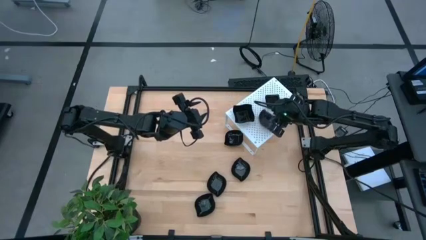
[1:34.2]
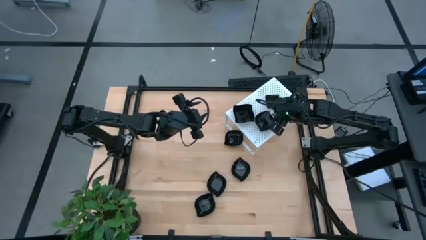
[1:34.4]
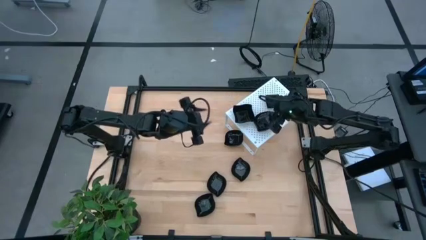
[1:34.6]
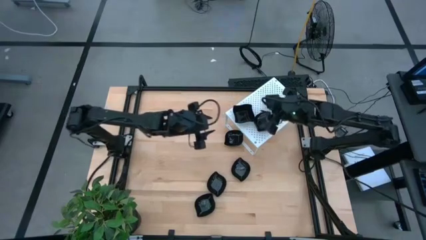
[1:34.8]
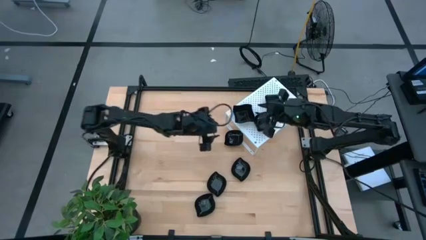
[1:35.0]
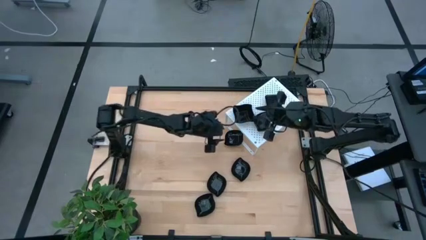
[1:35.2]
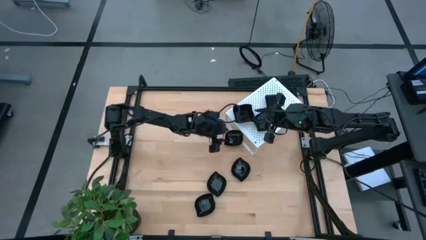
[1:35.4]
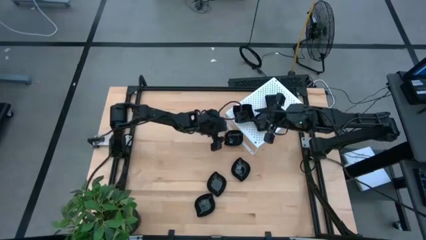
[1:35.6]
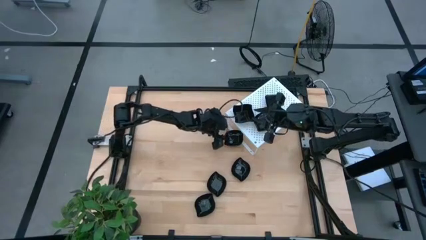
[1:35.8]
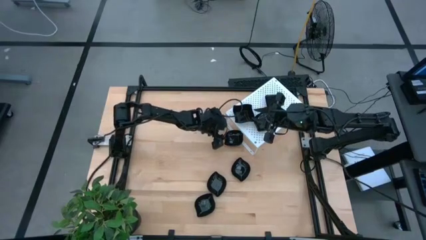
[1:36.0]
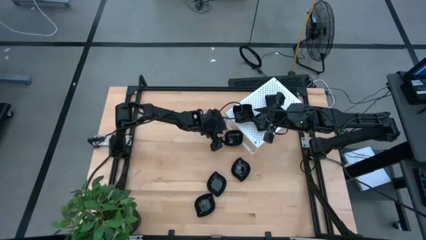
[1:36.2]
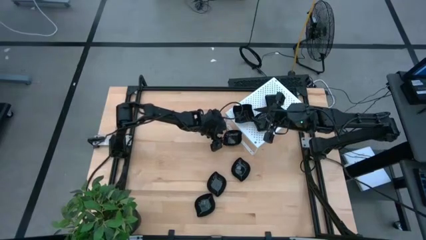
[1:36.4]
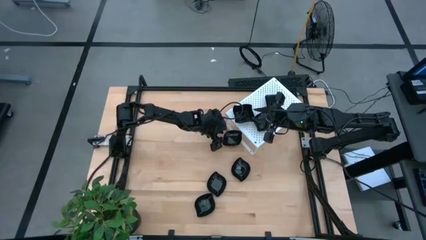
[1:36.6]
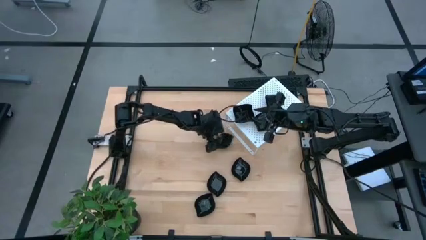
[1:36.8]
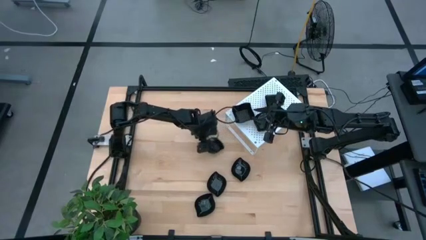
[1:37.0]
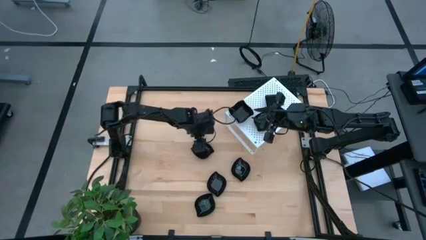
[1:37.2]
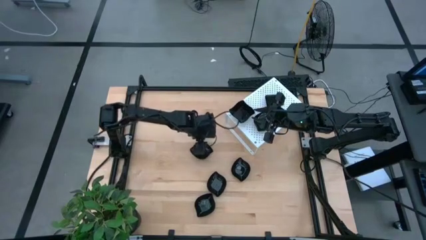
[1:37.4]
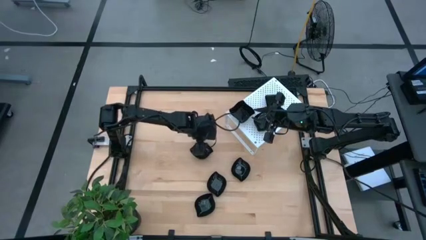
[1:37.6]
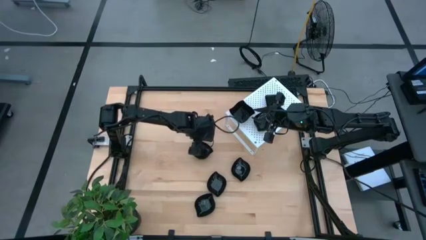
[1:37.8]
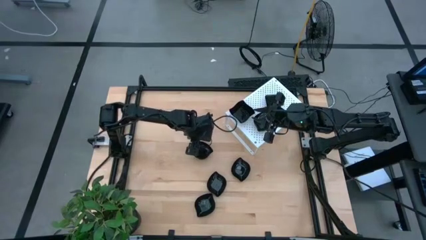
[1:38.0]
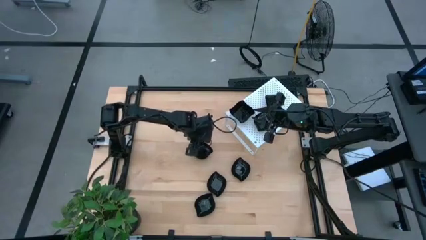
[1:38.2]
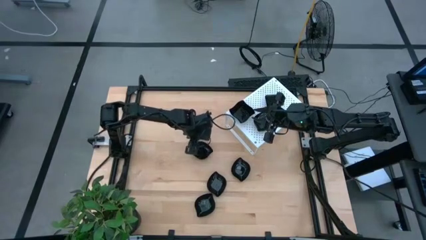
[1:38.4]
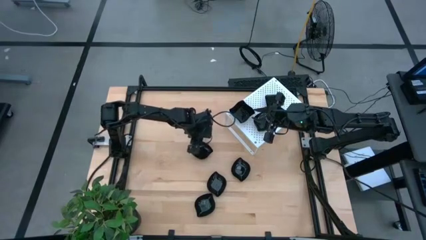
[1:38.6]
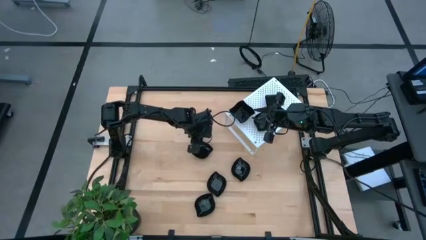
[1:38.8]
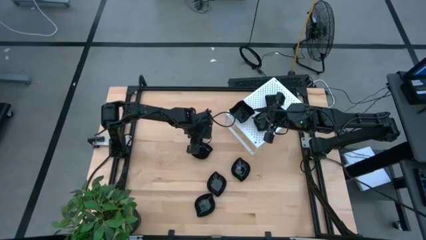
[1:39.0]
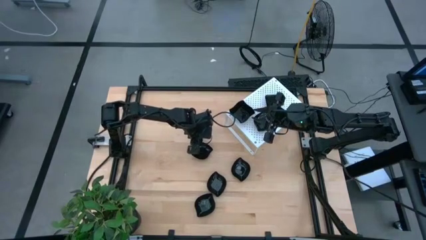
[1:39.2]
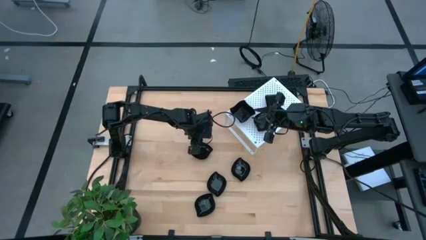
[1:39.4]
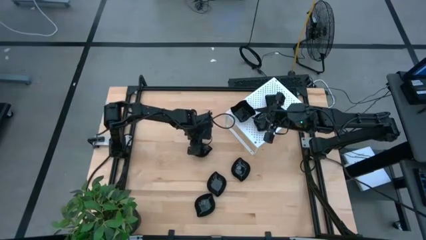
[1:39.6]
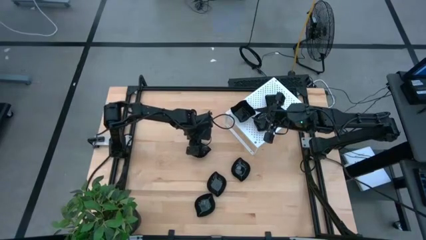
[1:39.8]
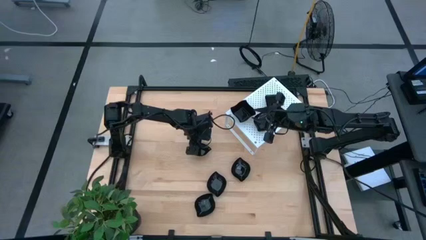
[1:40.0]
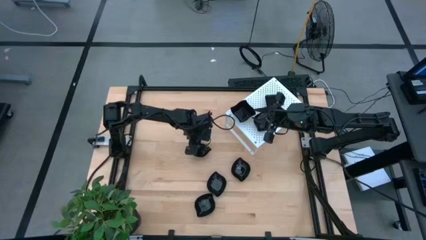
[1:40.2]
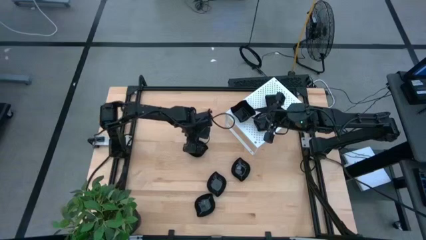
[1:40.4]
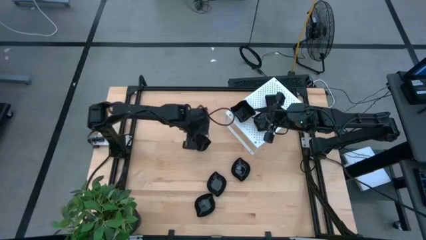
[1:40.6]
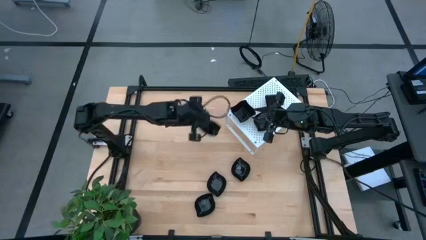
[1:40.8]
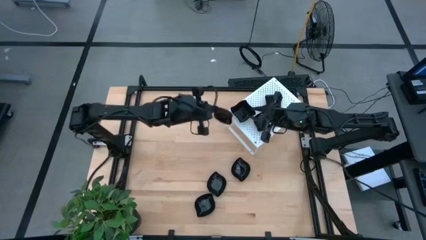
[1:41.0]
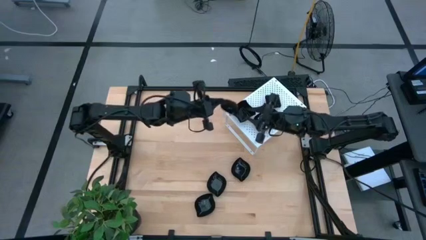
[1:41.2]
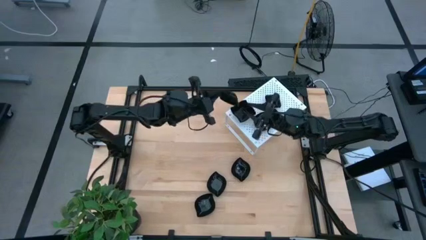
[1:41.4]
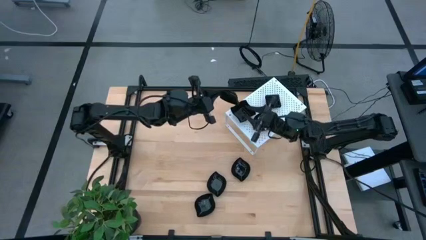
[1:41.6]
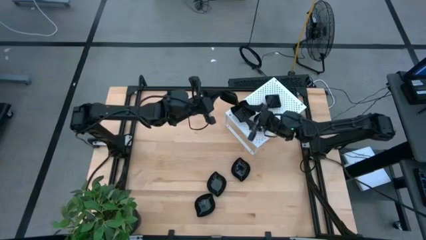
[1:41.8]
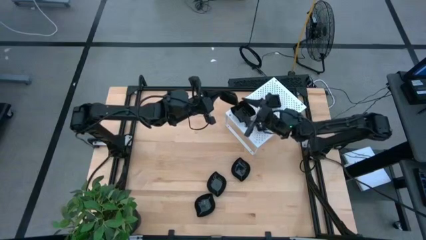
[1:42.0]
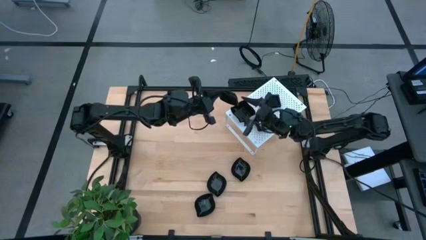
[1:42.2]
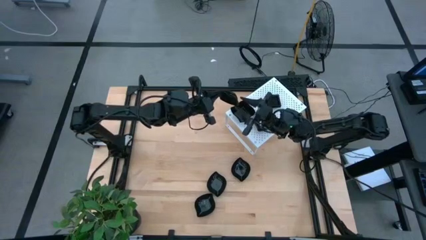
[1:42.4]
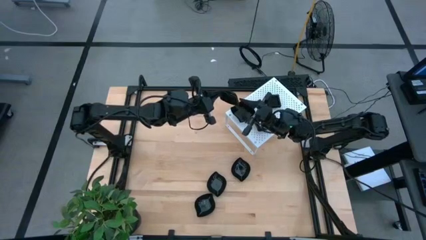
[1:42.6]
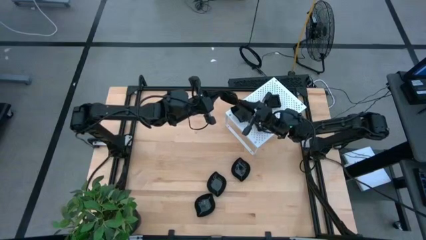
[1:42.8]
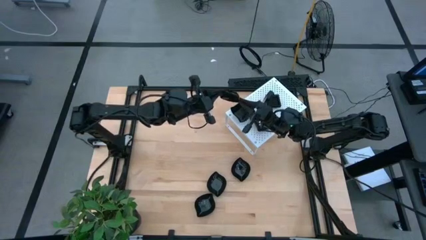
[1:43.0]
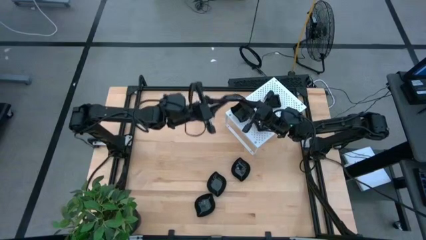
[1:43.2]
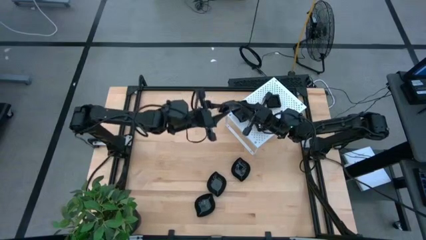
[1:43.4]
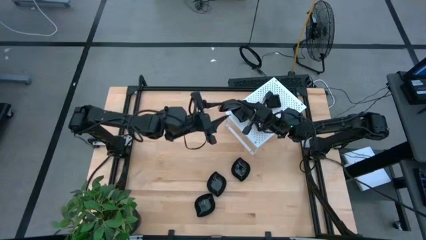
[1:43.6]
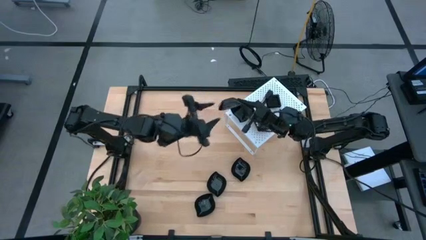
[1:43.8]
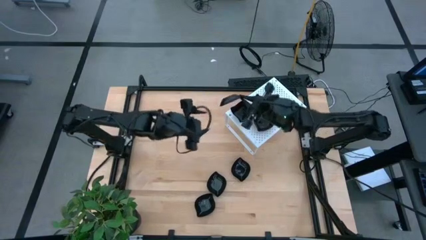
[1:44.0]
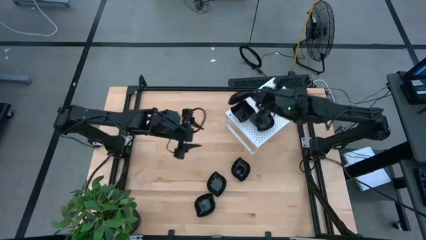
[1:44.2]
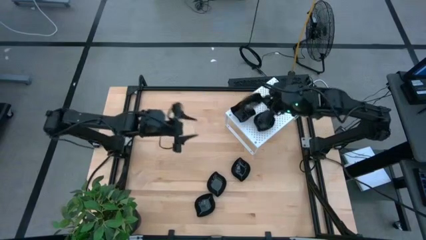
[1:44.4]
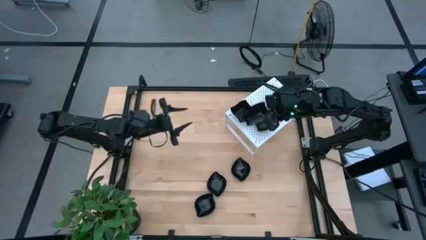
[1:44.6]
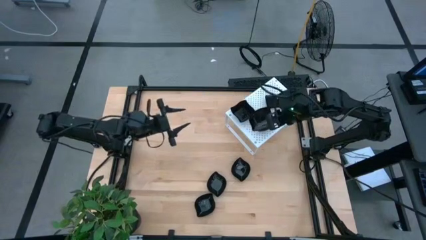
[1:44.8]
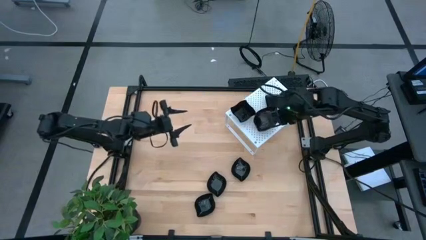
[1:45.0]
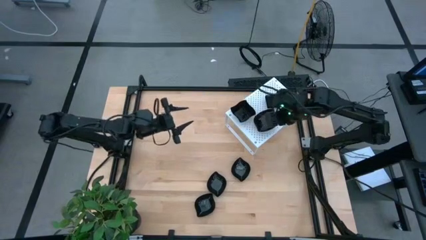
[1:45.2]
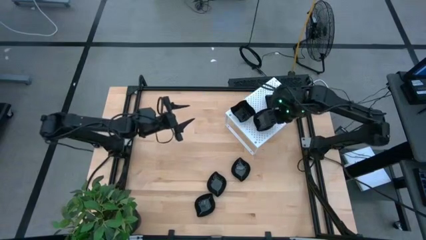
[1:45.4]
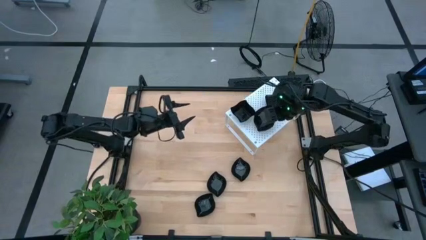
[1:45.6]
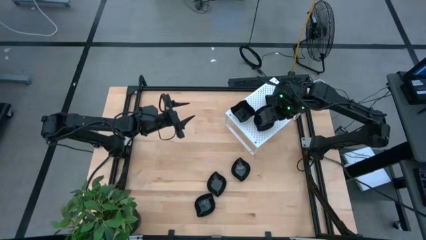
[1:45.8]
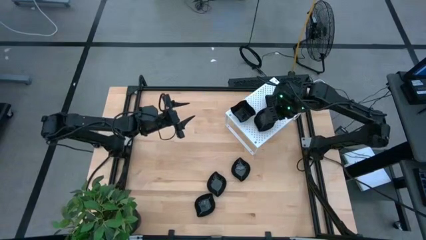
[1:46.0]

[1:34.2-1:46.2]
Task: Pick & Place Mini shaped plates
Stack the black leaf shaped plate on top of the black leaf shaped plate on the shelf

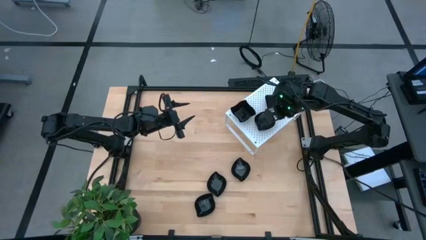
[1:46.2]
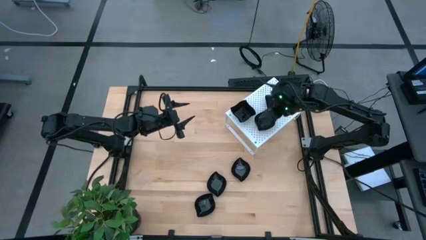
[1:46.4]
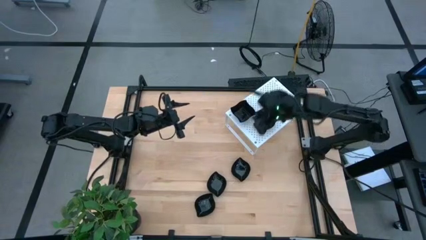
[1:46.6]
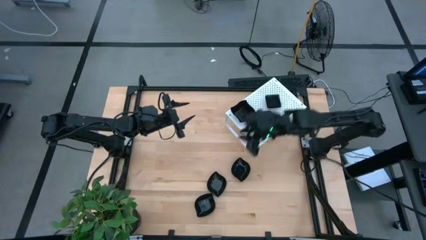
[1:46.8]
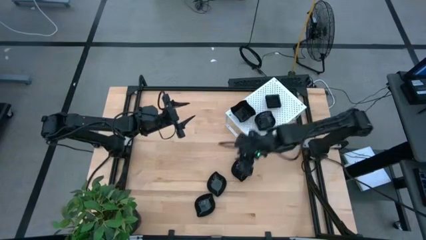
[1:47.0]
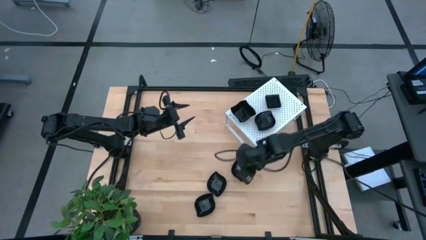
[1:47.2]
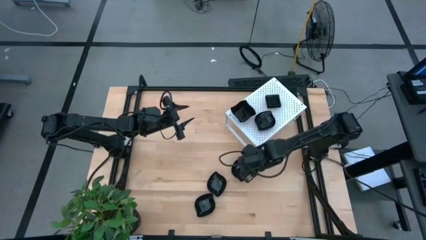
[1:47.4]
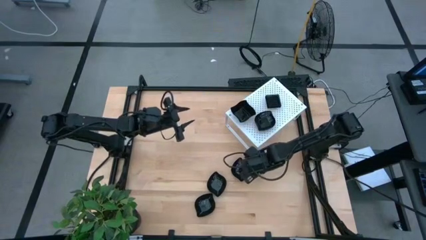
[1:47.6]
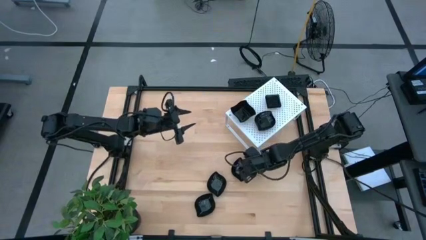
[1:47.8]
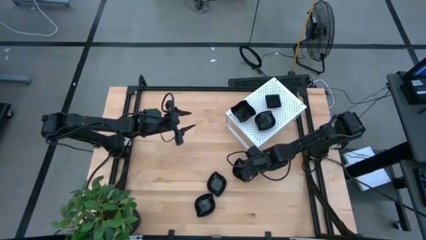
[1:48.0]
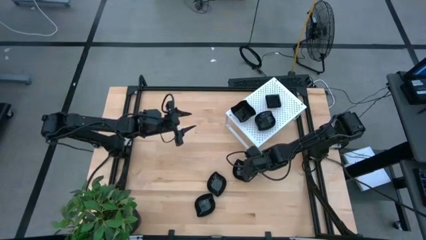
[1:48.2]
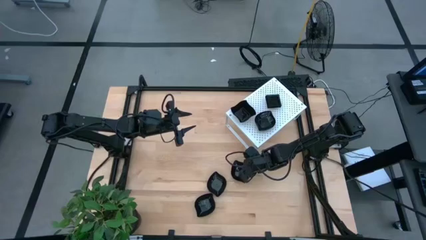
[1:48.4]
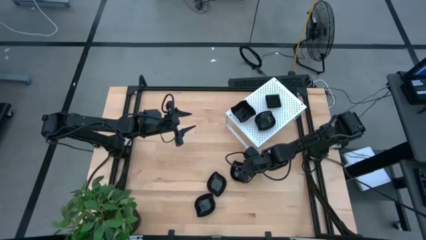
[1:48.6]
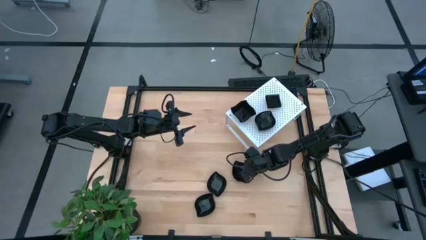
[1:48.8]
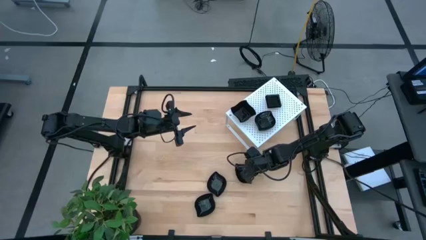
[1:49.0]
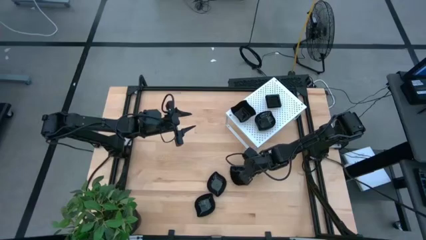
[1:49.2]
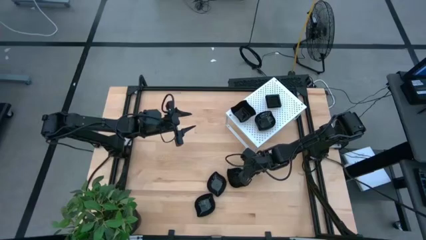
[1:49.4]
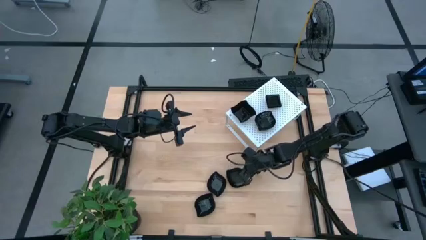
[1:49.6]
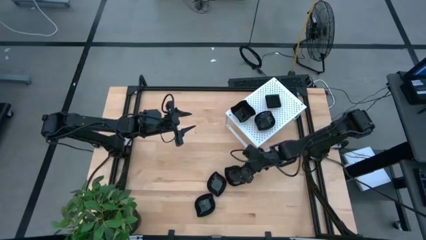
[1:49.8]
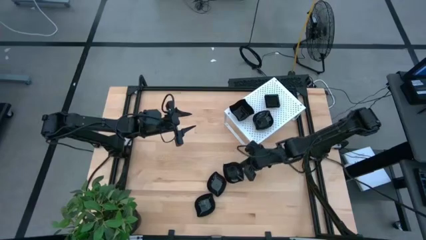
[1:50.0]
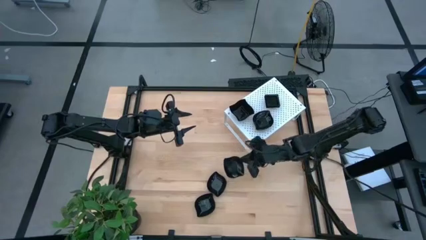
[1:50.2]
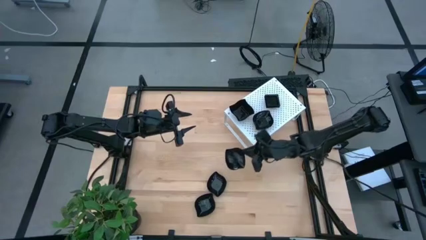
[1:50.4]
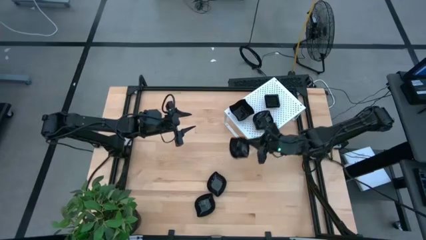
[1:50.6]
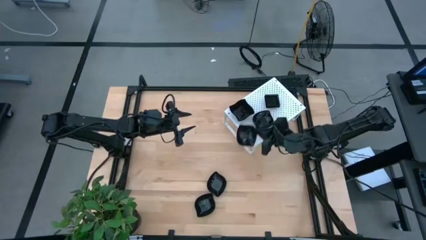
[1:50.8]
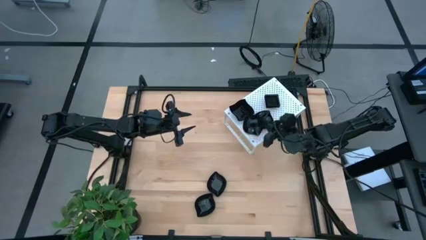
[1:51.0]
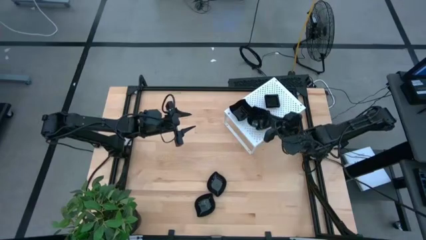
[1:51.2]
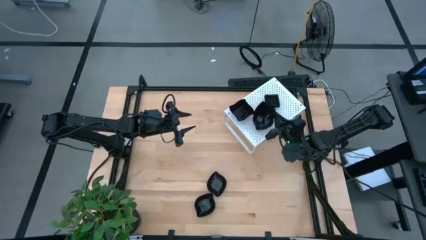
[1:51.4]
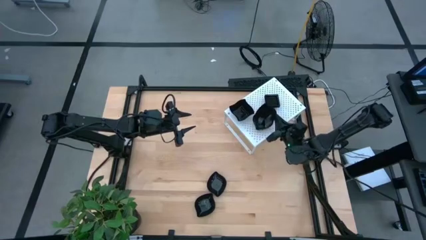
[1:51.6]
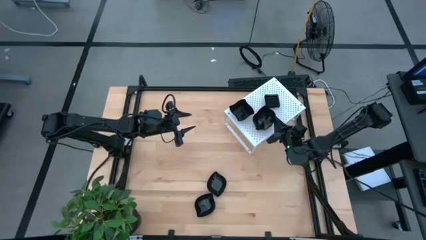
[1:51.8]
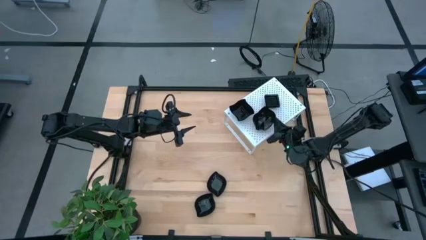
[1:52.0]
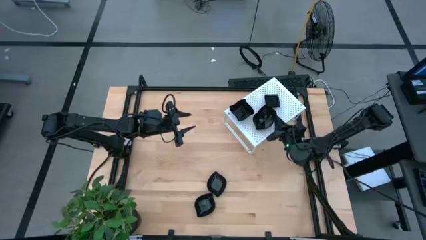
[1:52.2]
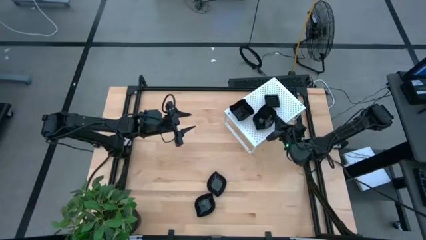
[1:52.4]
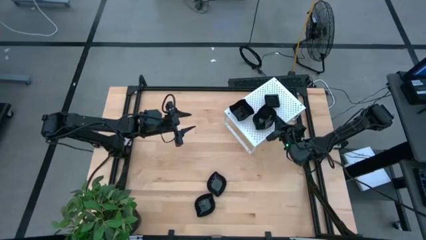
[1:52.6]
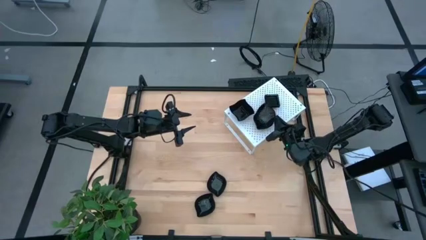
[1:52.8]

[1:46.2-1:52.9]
Stack the black leaf shaped plate on top of the black leaf shaped plates on the shelf
